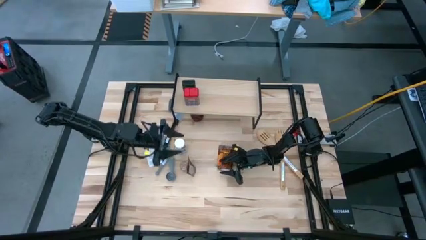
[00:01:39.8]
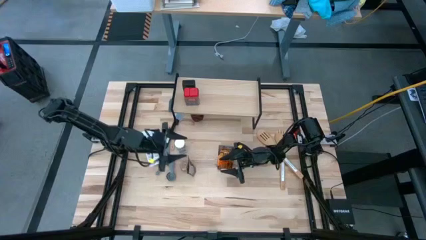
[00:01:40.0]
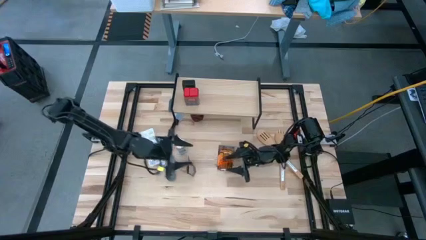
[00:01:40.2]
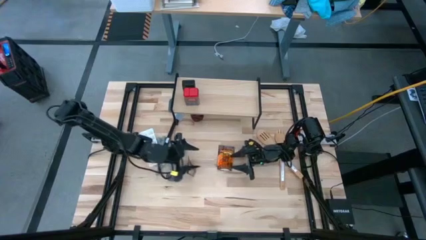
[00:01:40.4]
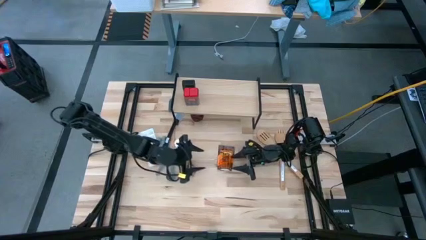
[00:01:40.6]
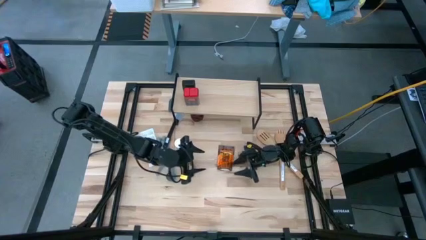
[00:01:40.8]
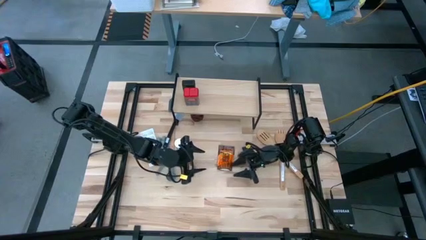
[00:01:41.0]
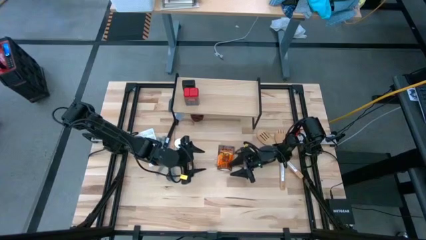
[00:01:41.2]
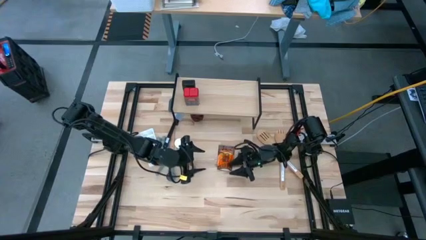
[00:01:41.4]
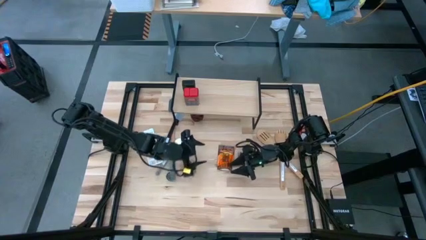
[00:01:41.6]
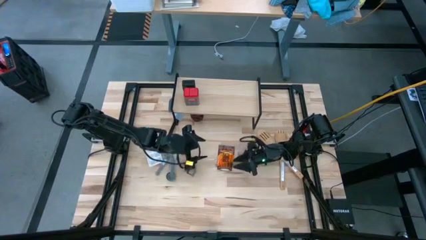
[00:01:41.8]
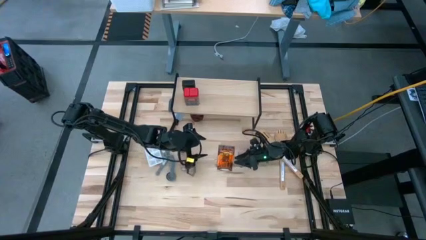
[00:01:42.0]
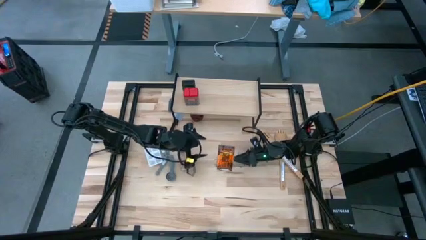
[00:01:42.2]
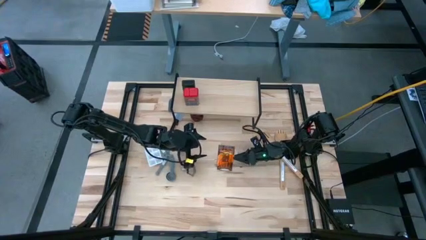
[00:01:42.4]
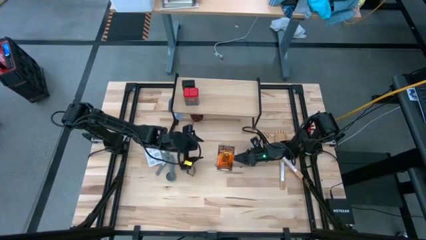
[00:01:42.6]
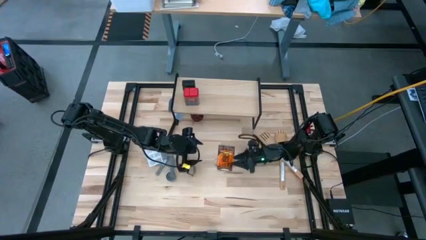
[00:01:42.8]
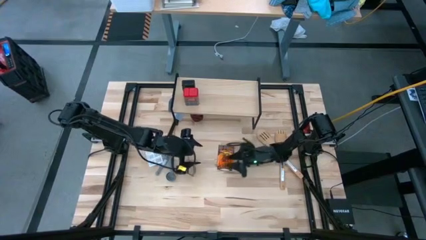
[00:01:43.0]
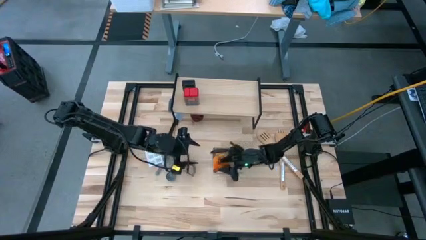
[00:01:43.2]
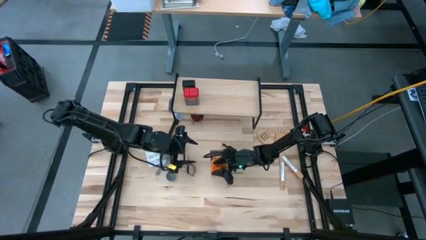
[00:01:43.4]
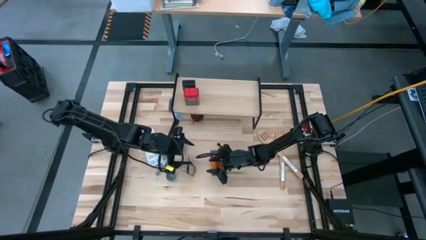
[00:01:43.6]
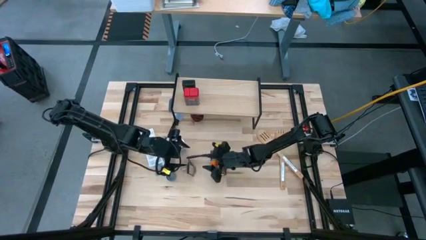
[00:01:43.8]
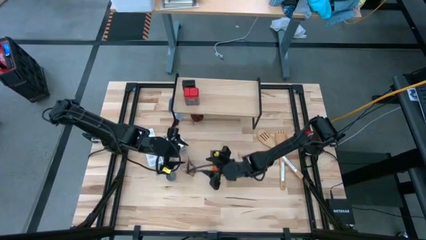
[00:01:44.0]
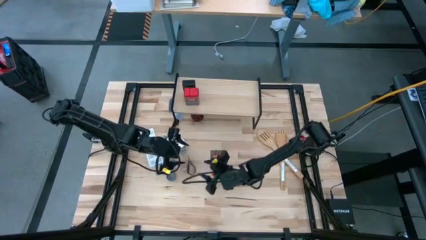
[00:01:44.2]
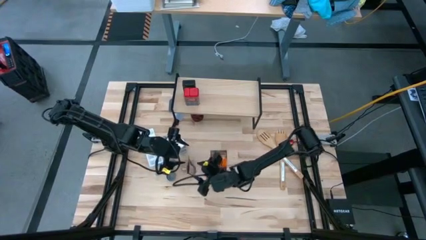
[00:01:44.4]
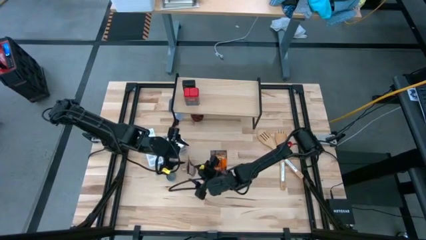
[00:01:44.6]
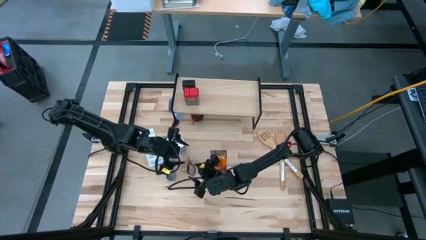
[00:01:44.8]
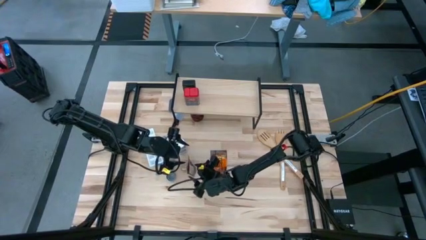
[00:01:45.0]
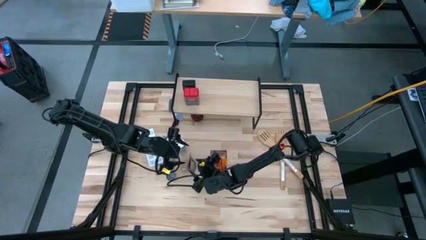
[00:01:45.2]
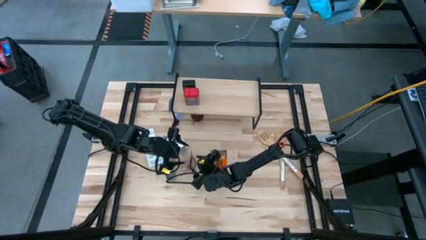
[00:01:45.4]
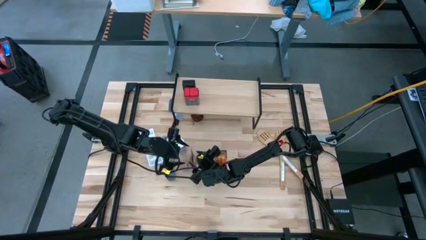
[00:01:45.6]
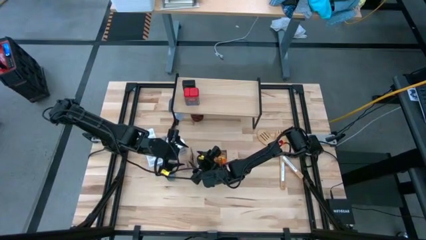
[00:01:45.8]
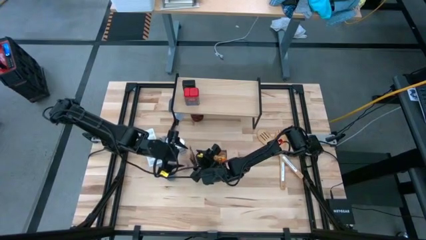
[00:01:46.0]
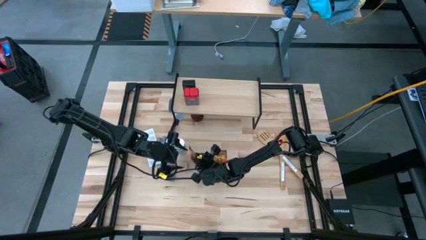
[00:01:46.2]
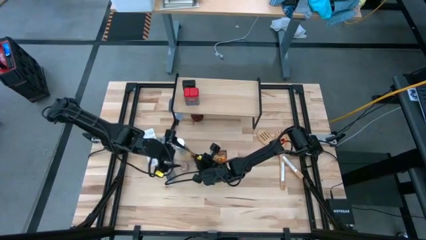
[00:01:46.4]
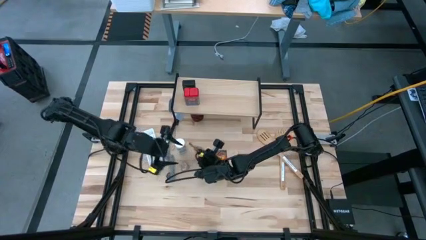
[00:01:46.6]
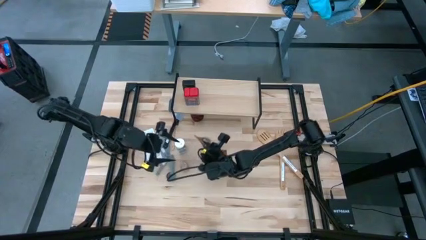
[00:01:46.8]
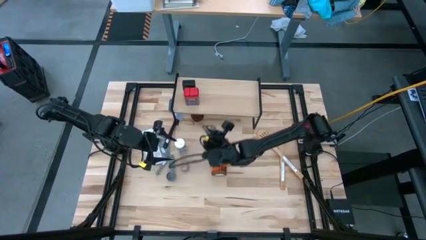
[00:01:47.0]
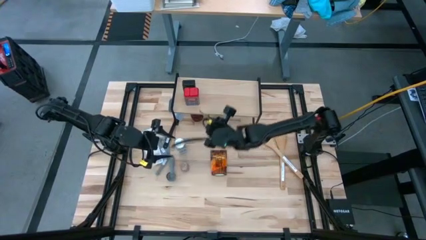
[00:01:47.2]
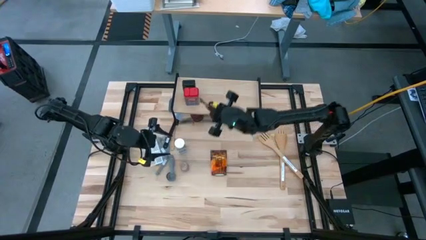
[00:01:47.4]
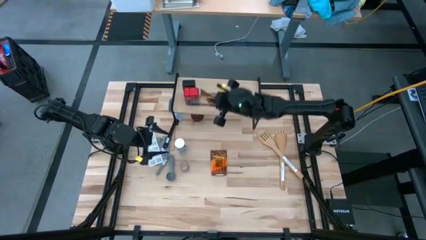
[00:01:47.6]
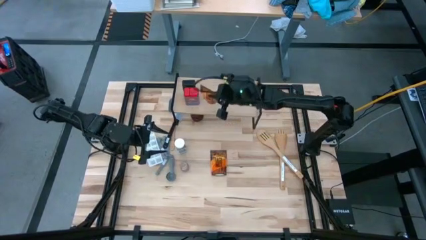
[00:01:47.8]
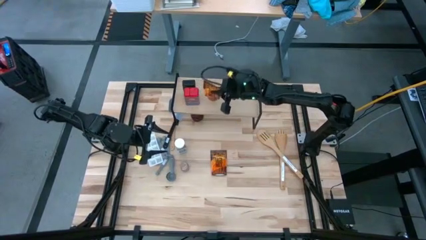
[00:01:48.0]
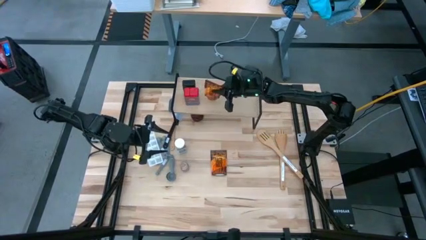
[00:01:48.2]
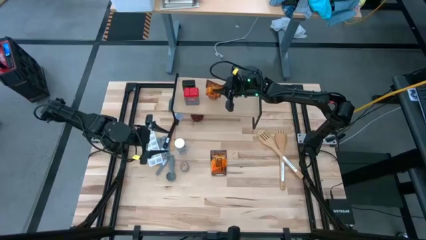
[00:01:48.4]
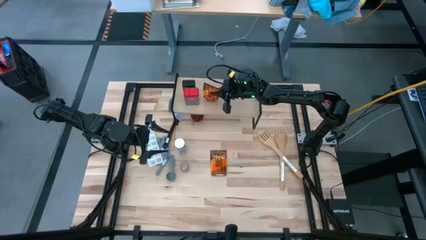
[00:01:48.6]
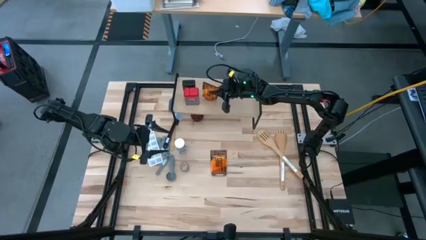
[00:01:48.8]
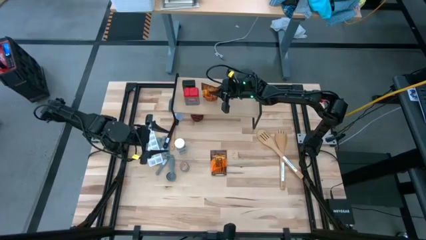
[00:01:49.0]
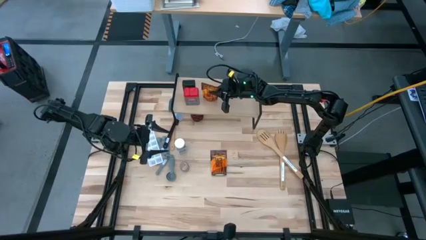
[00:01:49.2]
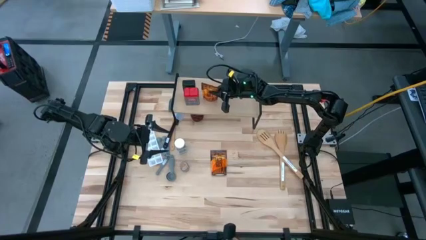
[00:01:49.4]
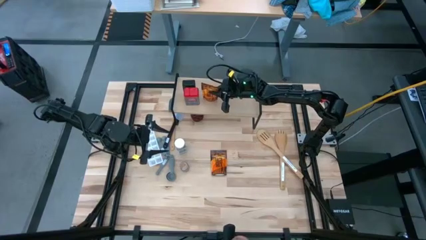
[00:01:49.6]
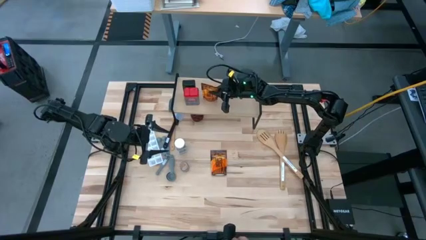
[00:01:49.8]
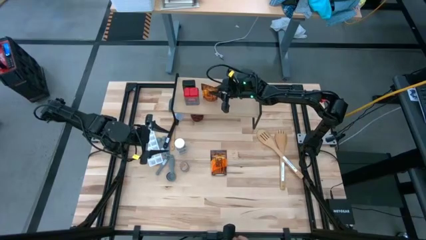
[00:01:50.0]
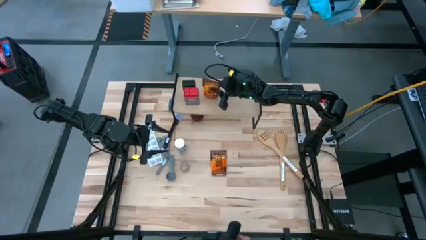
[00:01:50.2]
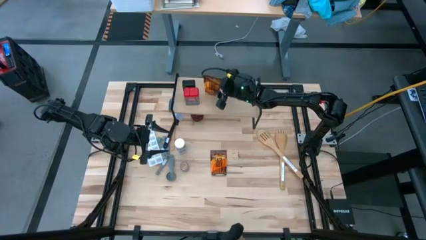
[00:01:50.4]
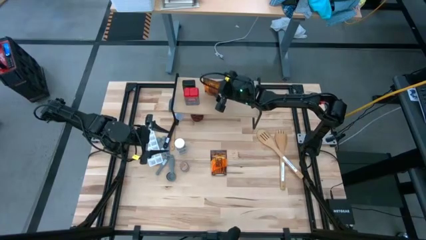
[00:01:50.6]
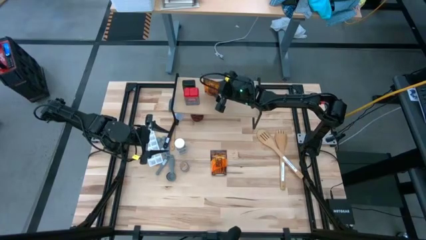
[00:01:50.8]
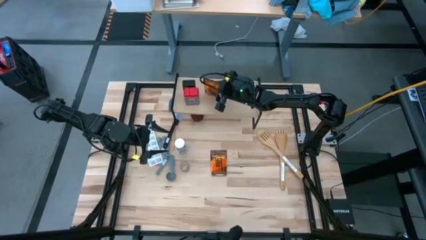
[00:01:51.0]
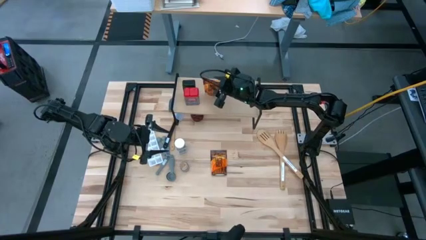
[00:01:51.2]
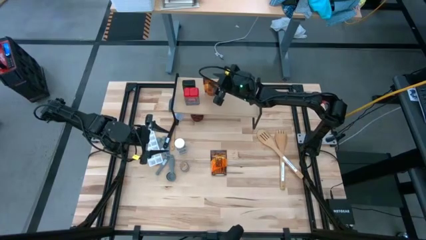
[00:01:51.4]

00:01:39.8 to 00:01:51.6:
Task: Shelf spices
Put the left orange seasoning pack on the shelf

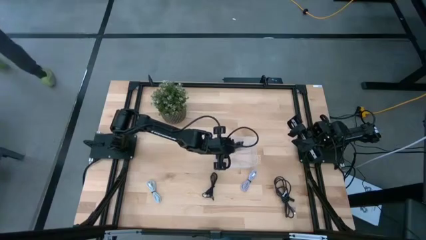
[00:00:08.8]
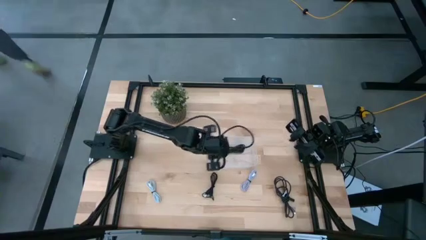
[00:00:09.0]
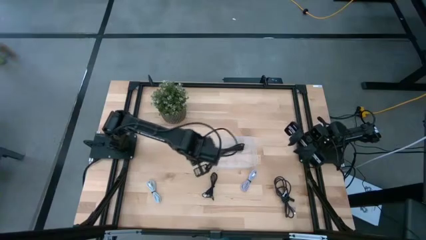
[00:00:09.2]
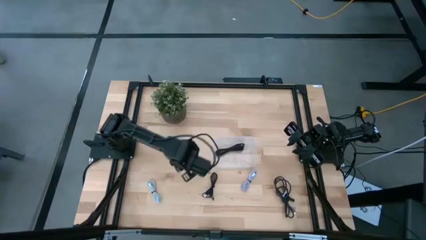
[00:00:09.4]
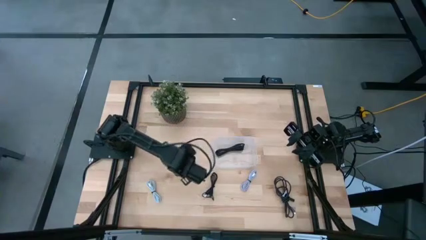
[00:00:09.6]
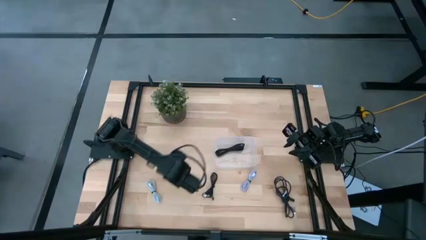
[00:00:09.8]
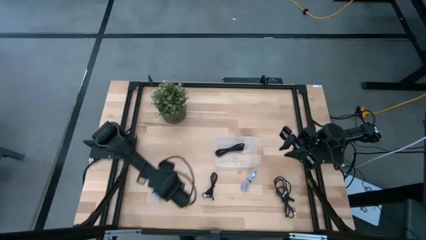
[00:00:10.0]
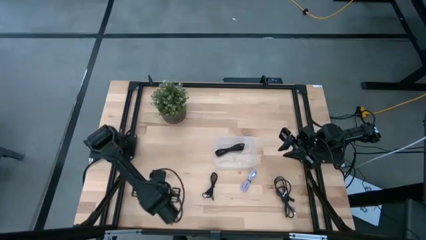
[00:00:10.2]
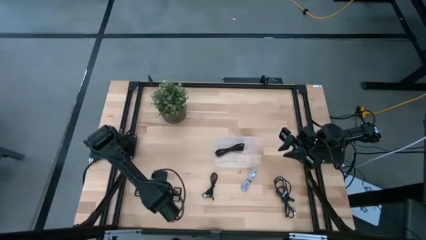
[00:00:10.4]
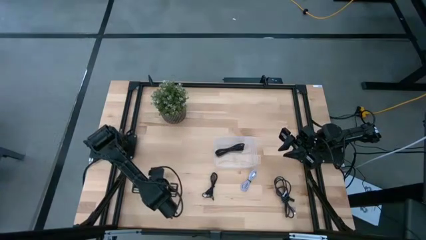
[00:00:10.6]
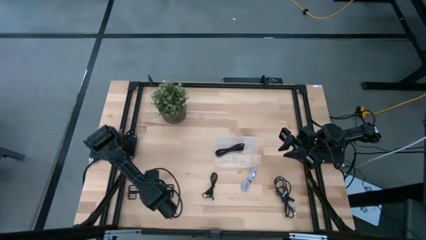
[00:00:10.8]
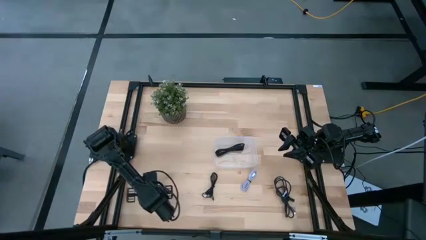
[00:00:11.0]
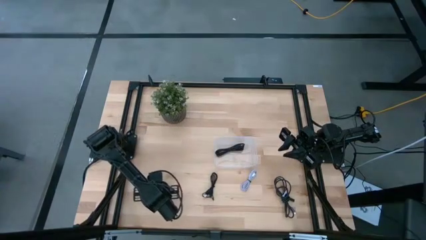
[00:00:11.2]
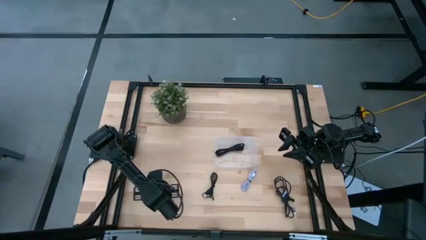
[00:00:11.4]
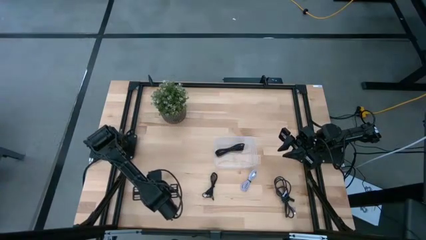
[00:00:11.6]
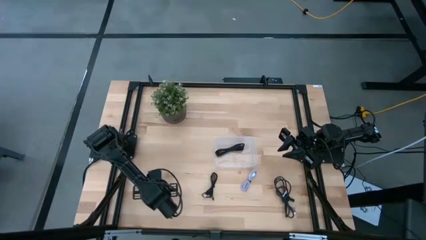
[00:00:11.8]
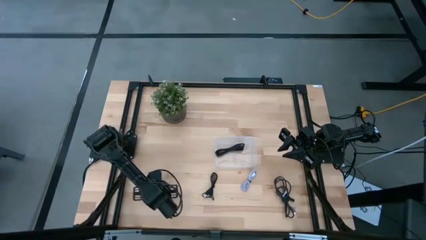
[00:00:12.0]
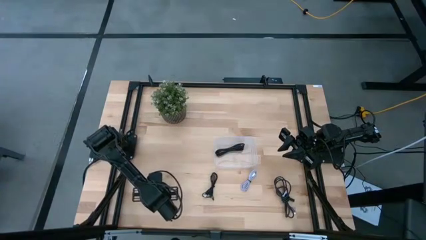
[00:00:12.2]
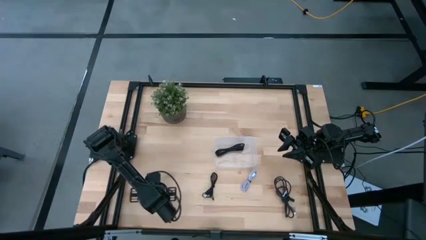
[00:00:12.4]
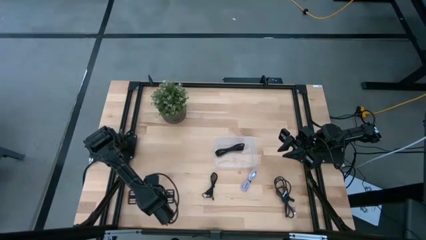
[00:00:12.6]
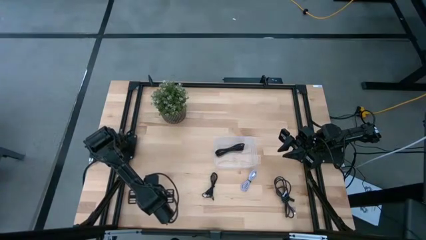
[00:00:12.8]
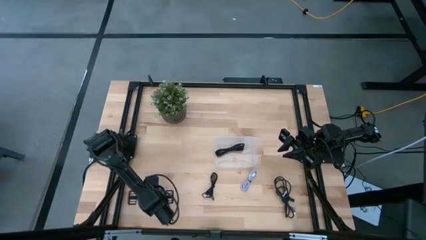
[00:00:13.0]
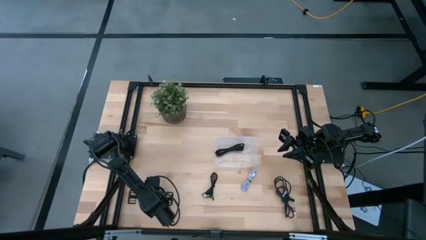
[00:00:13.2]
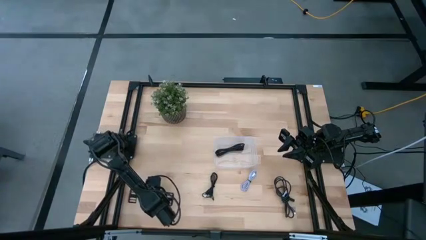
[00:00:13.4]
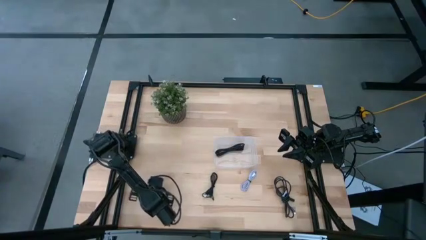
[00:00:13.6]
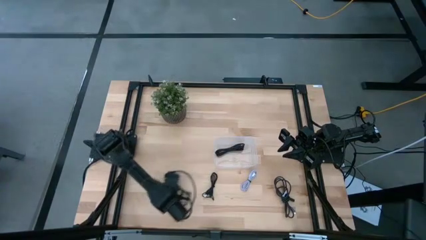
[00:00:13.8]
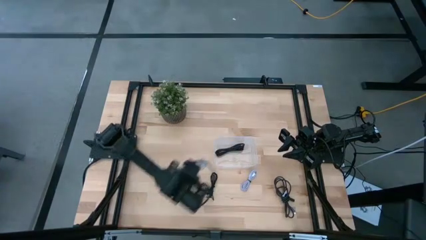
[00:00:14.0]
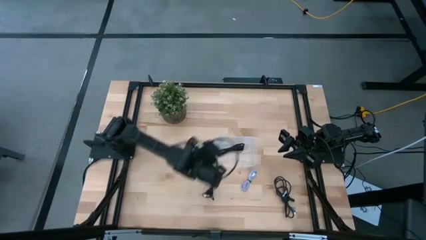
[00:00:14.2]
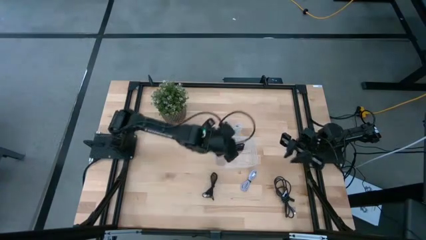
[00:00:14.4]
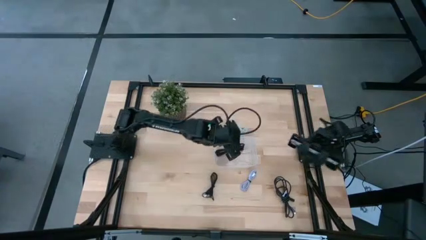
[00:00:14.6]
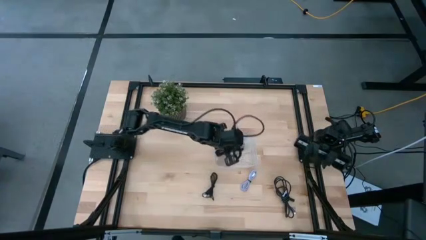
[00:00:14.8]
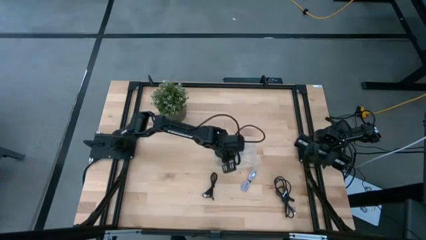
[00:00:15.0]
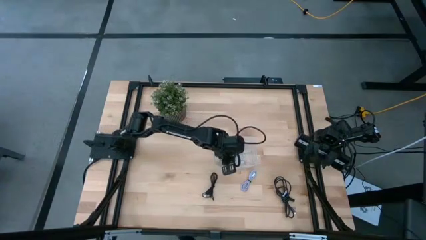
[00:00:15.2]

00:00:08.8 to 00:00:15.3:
Task: Pick and place USB-C Cables
Put the left white charger cable wire into the bin
